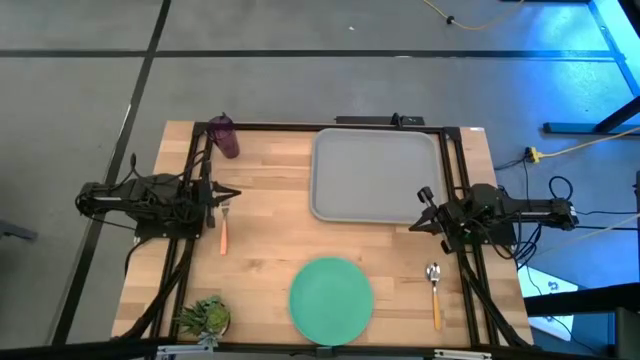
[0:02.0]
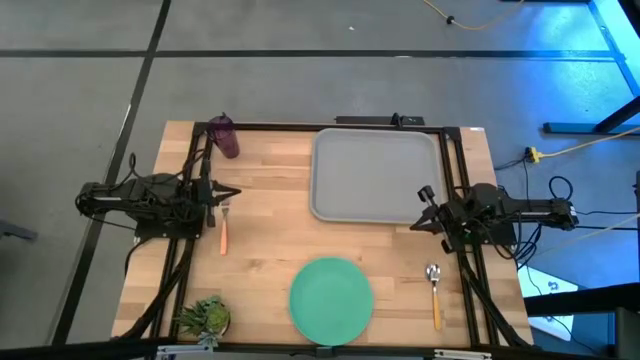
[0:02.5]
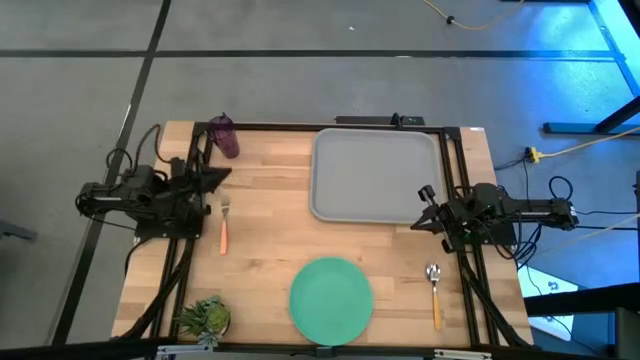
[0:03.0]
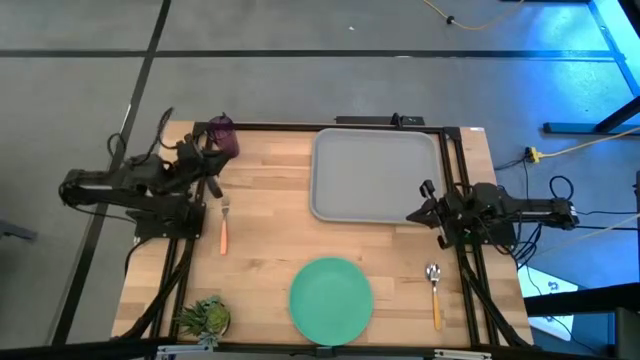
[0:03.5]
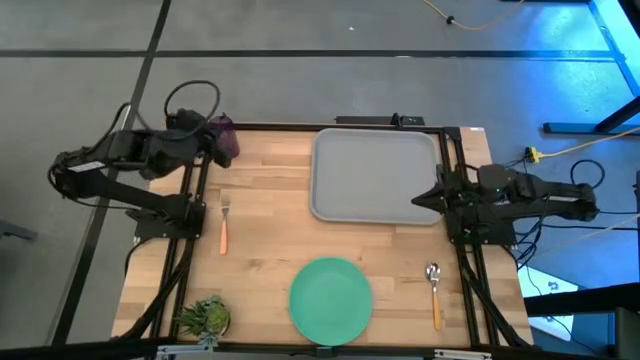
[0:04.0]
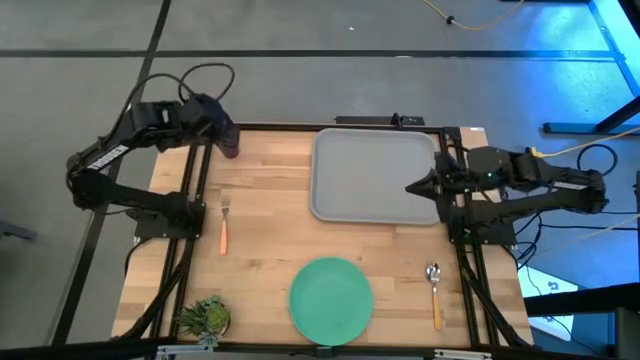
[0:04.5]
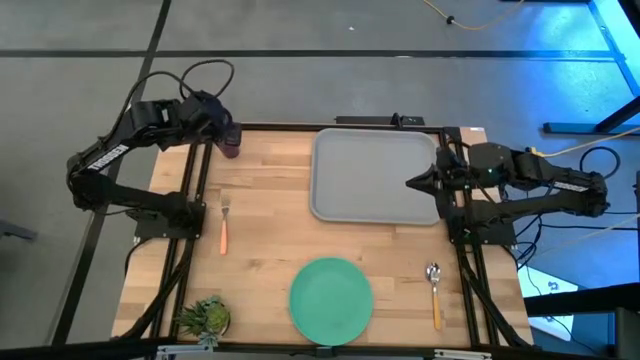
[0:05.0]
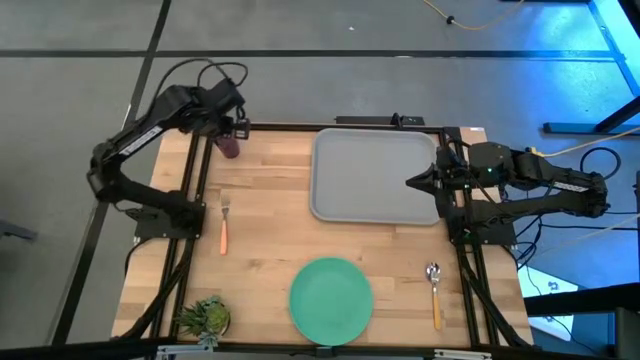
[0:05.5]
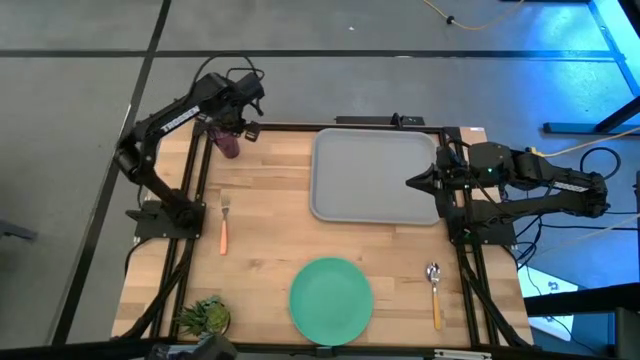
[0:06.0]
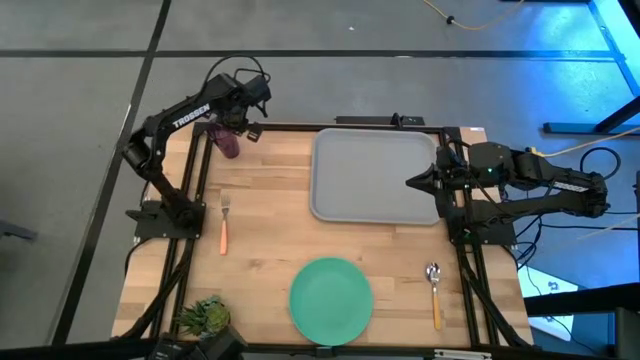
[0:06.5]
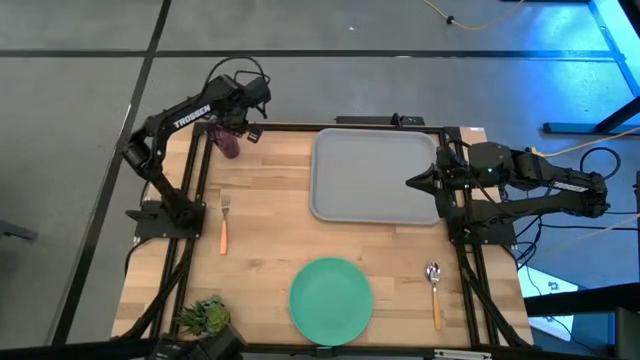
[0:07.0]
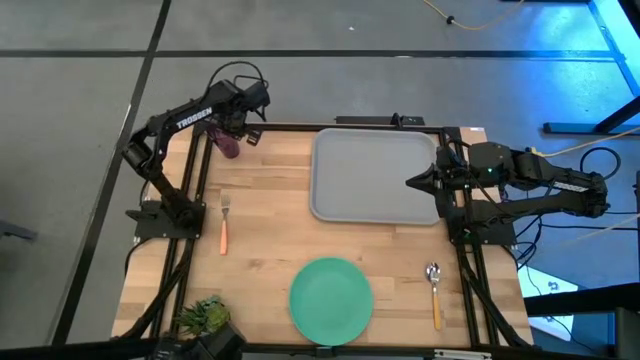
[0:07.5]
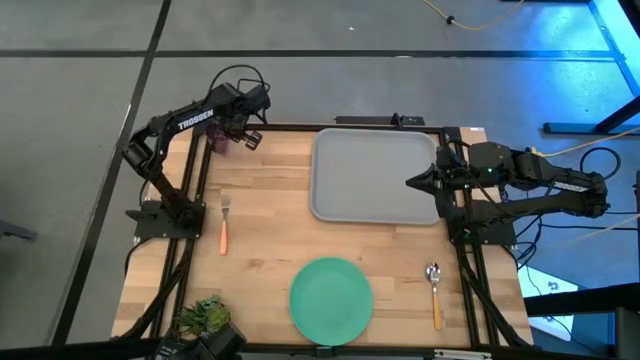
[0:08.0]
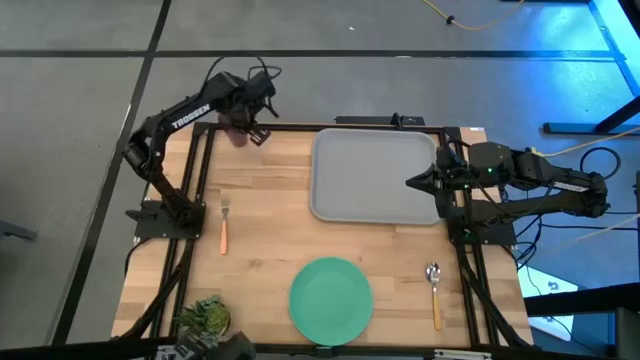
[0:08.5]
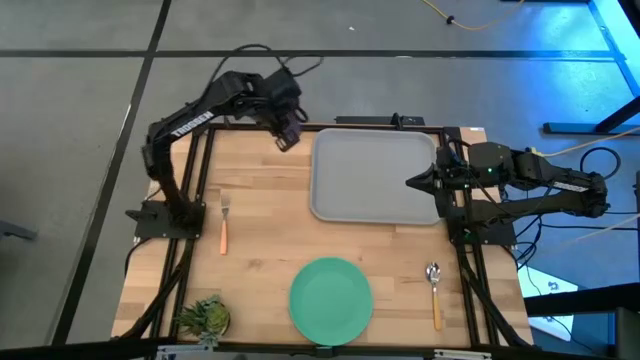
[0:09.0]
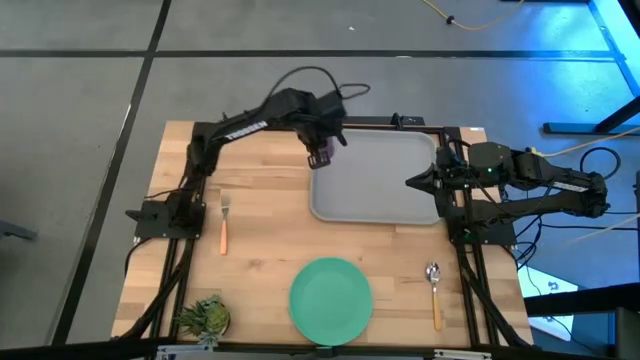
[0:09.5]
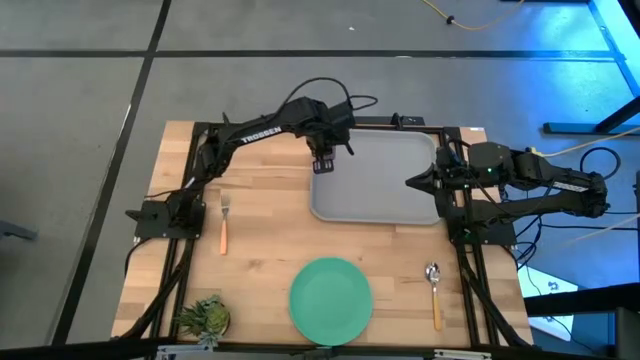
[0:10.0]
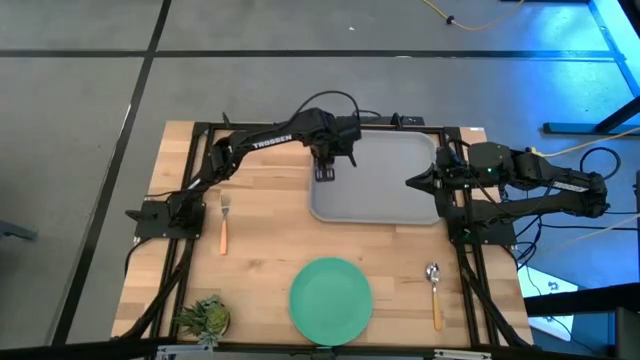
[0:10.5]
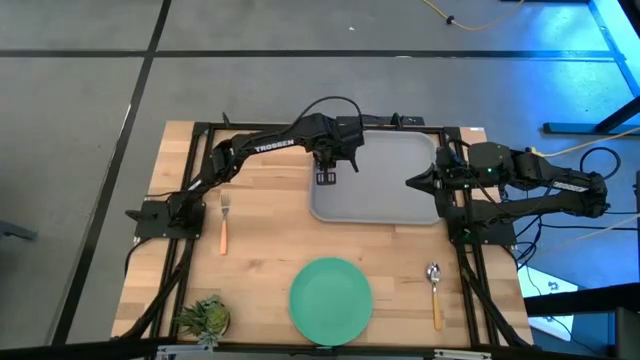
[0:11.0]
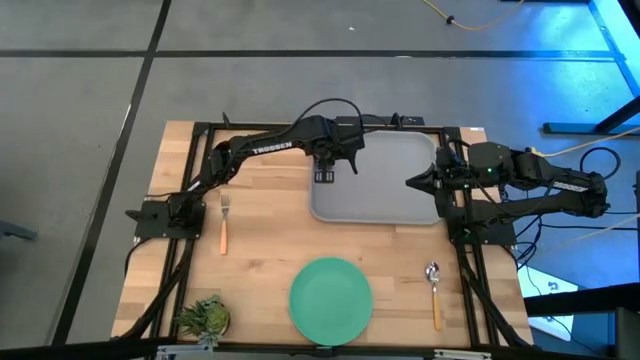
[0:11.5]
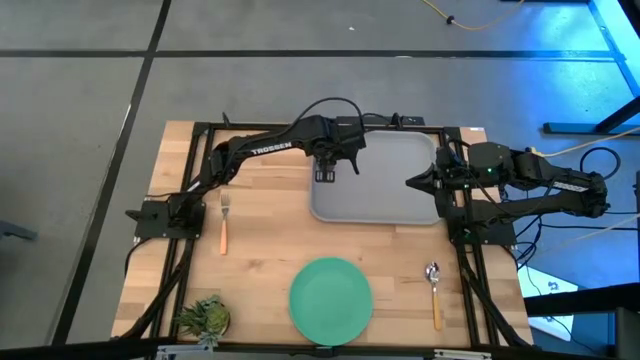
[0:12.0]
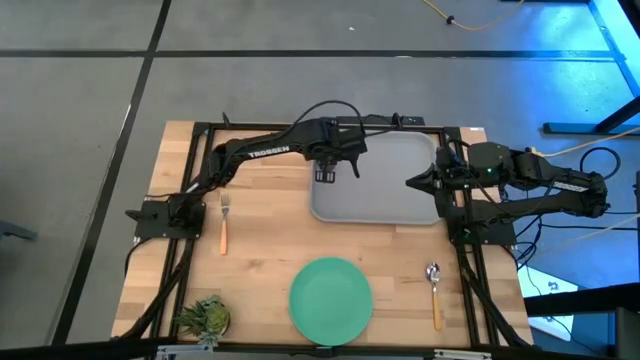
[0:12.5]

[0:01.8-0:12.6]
Task: Pick and place plate/cup/fork/spoon on tray
Put the purple cup on the top left of the gray tray

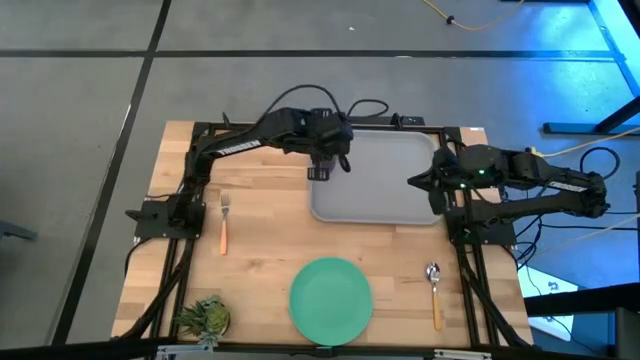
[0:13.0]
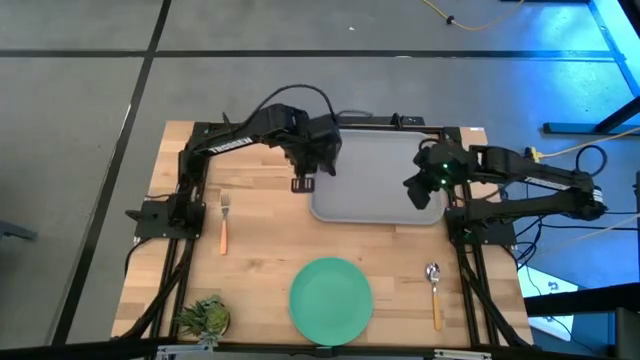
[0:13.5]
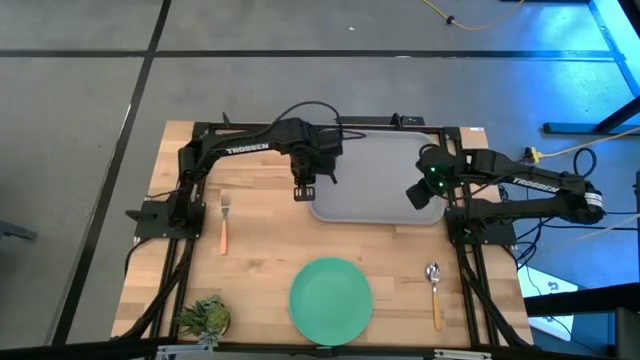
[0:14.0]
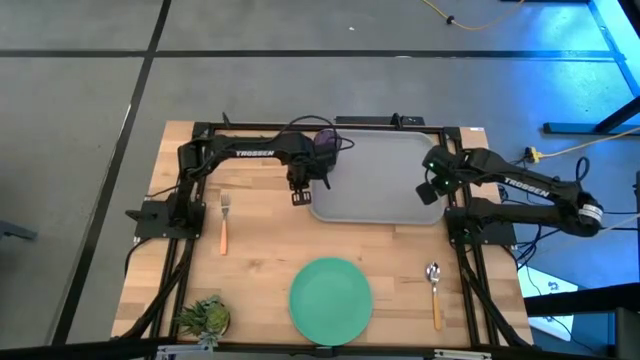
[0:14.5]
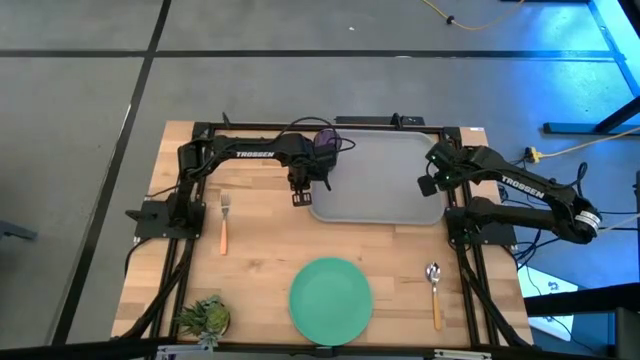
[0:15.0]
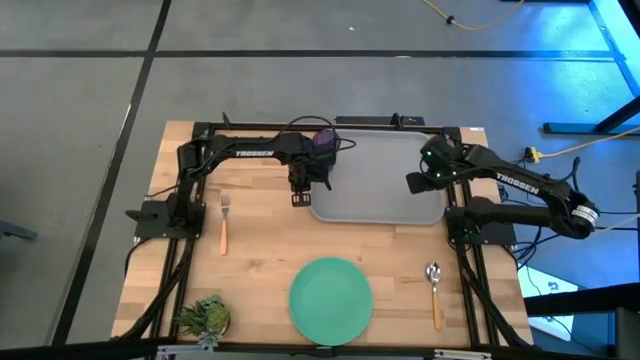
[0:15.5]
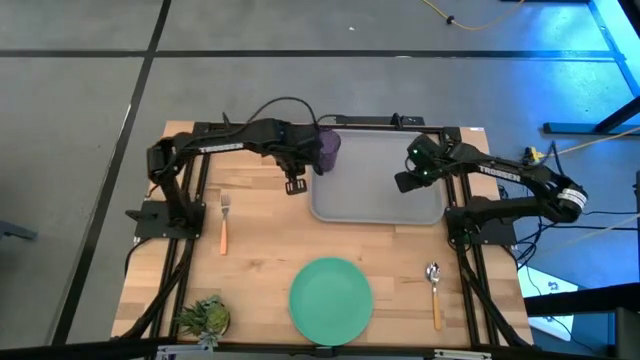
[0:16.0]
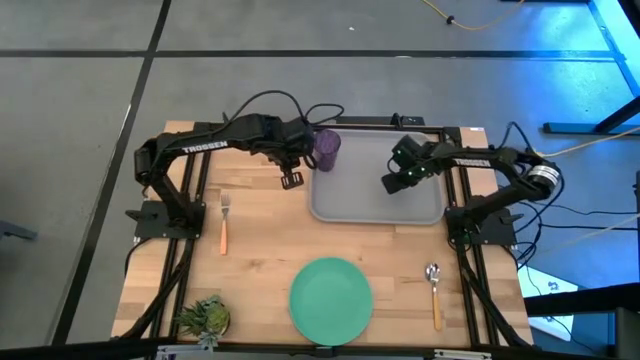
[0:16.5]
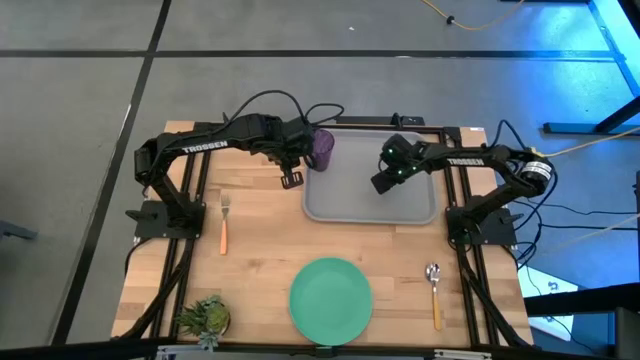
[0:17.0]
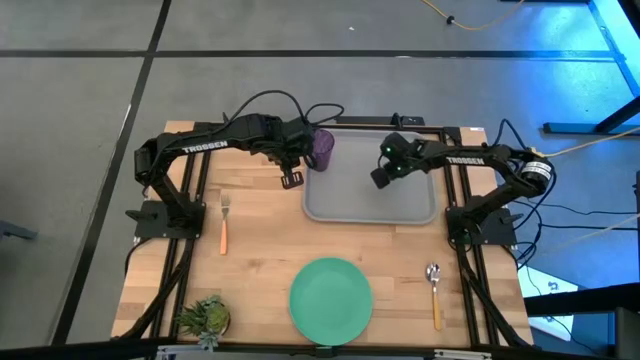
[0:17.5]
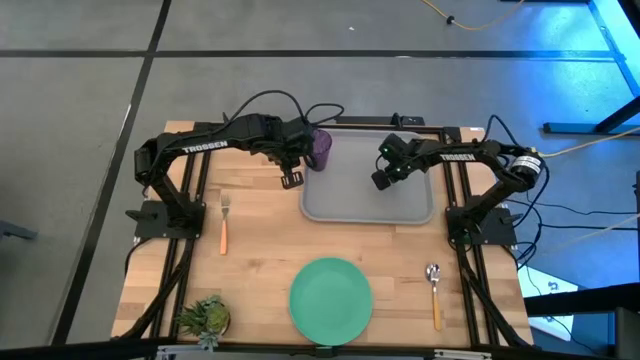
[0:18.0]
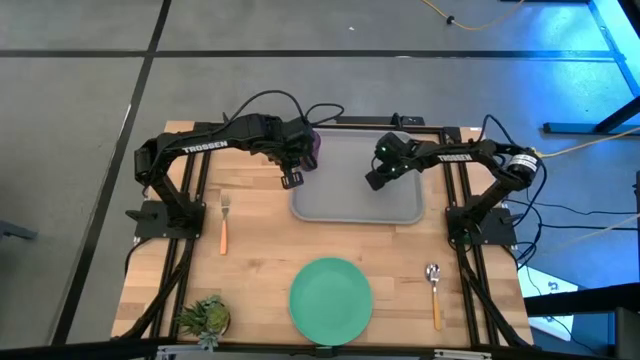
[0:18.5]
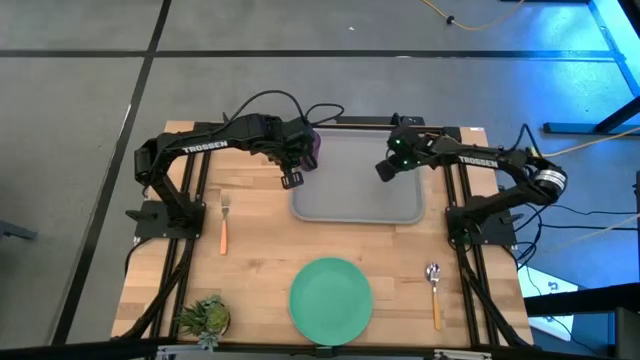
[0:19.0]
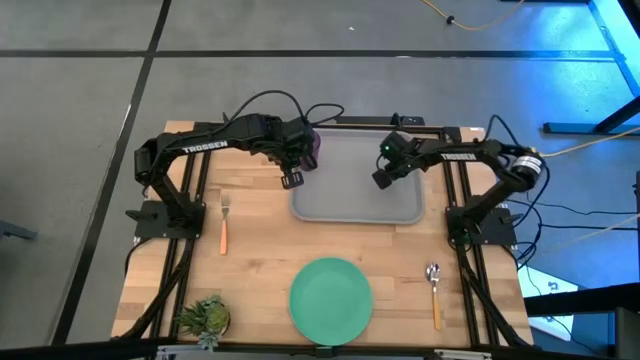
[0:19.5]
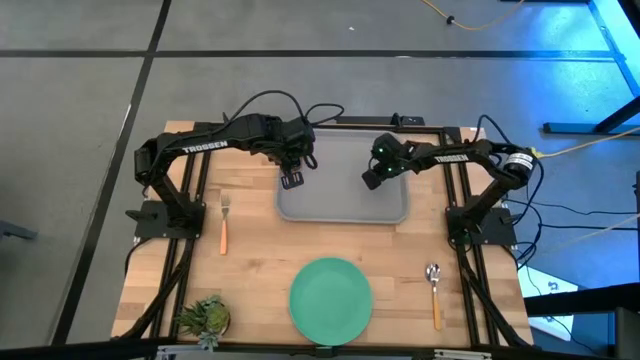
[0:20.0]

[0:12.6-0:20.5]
Adjust the gray tray

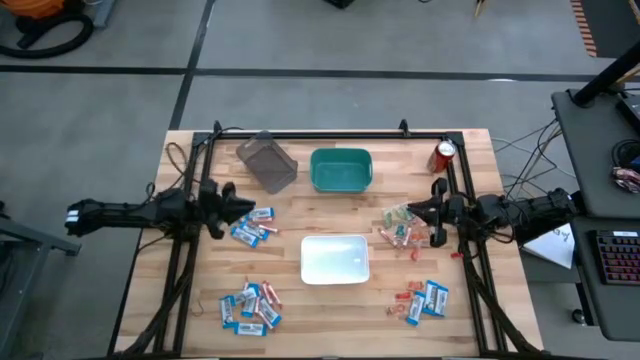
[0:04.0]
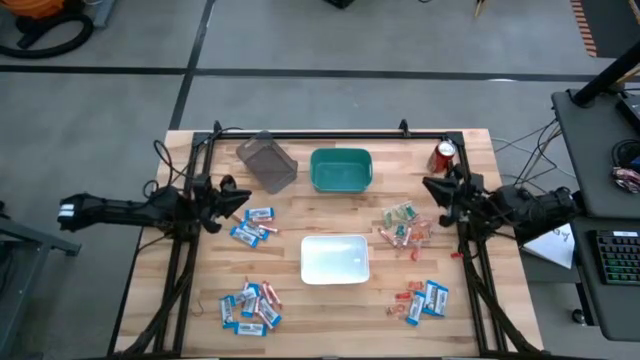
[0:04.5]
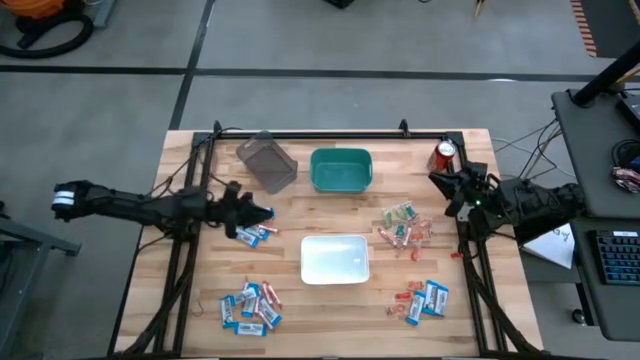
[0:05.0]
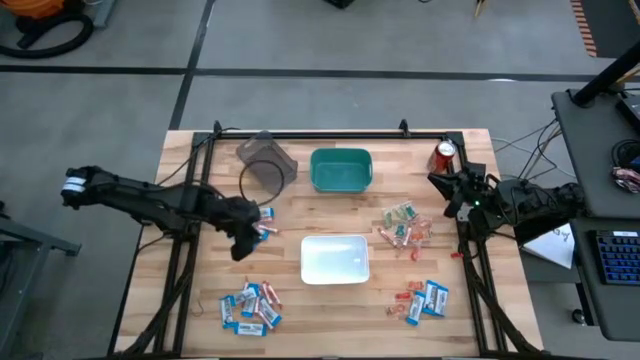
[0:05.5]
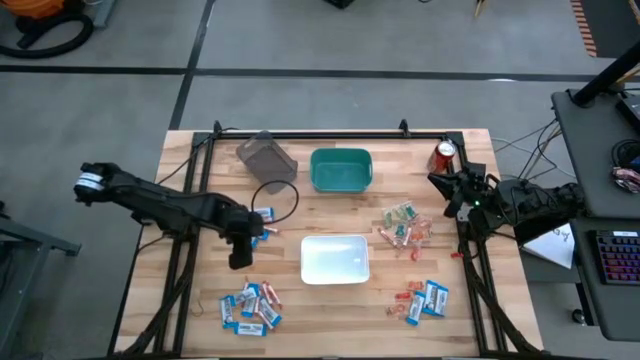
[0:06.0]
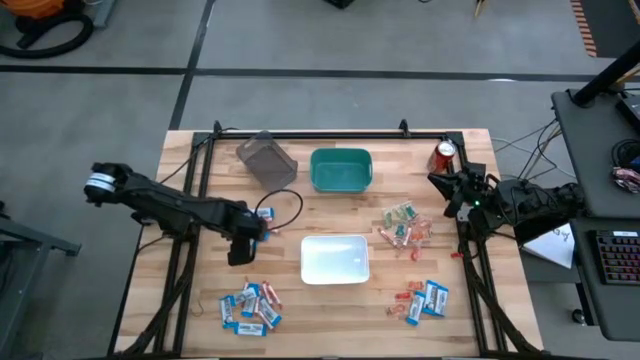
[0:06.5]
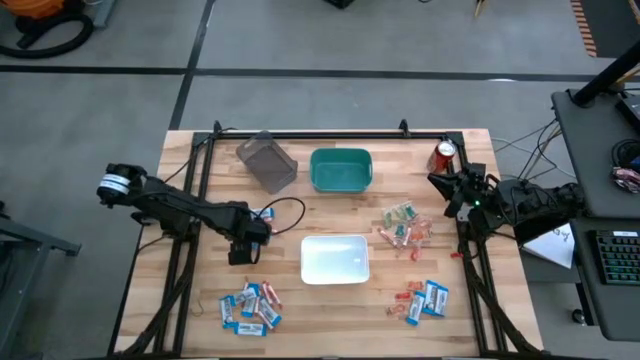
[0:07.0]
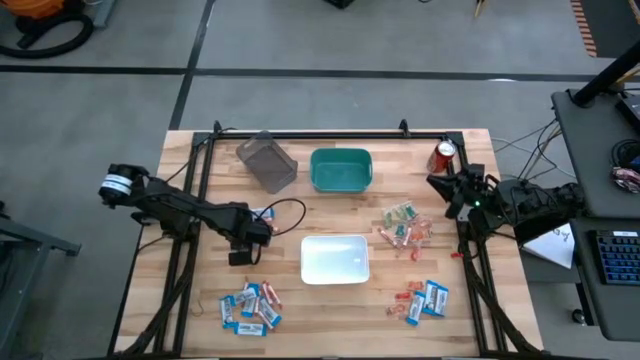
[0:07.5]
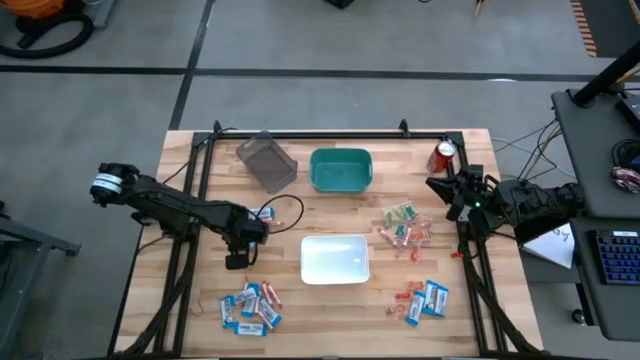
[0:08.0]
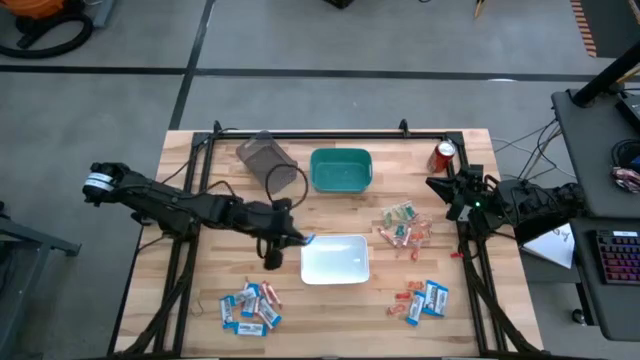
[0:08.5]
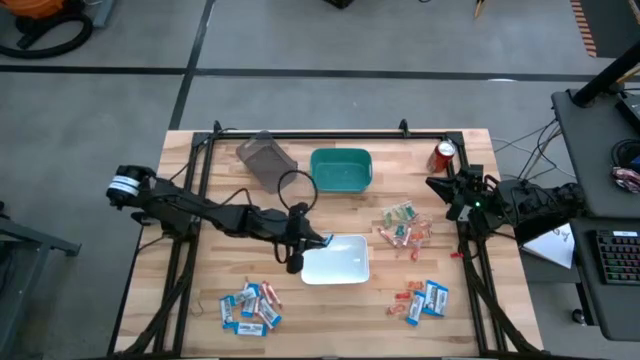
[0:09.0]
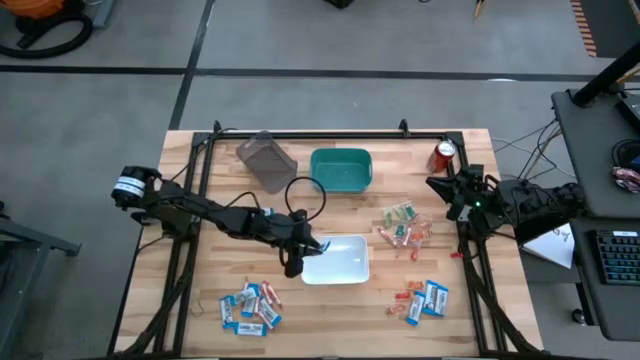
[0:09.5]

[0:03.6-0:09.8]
Task: Sort candy
Put the white chocolate bar into the white bin
